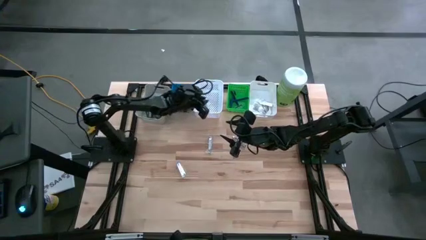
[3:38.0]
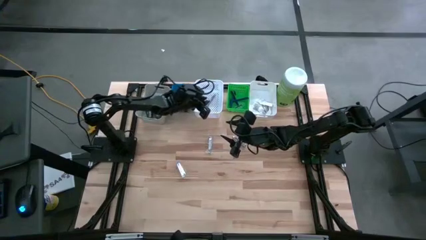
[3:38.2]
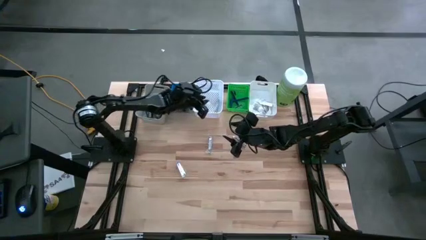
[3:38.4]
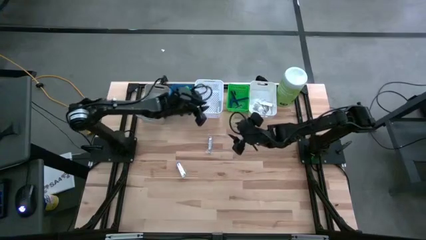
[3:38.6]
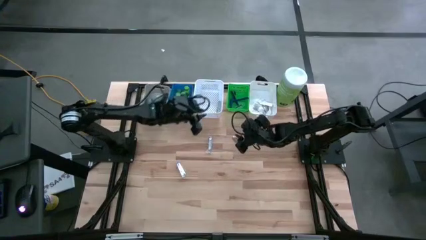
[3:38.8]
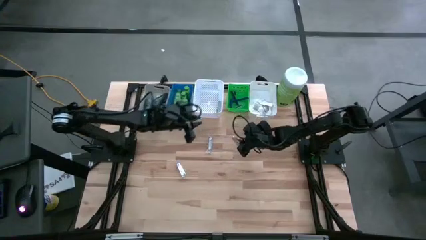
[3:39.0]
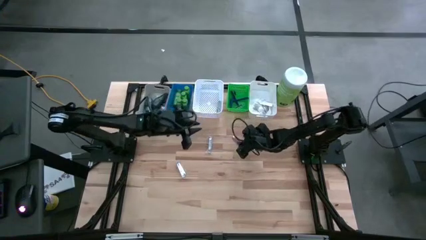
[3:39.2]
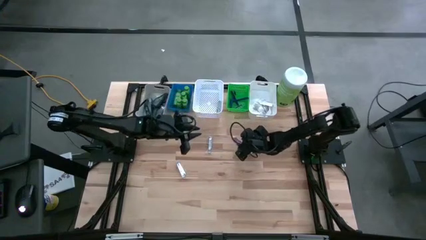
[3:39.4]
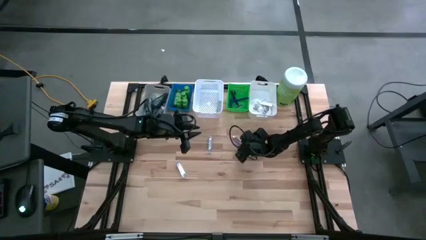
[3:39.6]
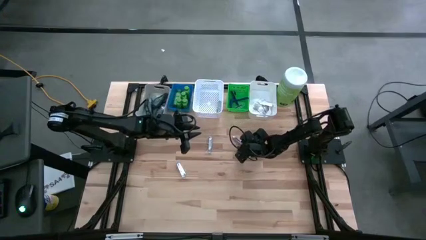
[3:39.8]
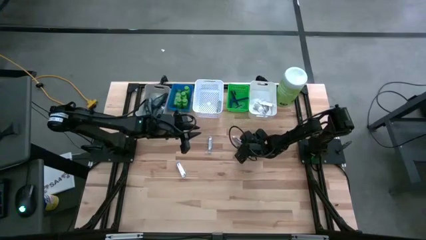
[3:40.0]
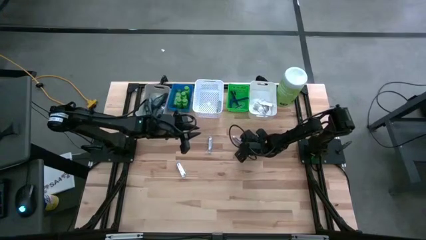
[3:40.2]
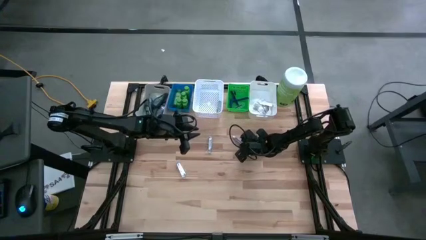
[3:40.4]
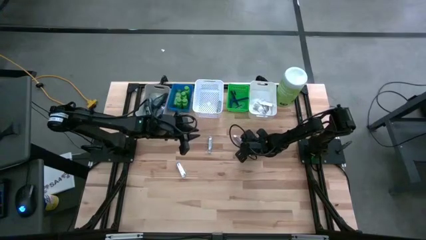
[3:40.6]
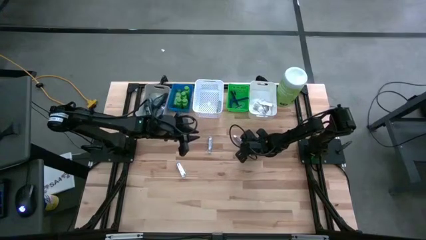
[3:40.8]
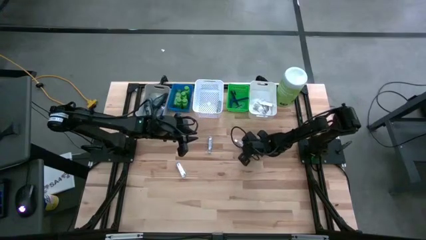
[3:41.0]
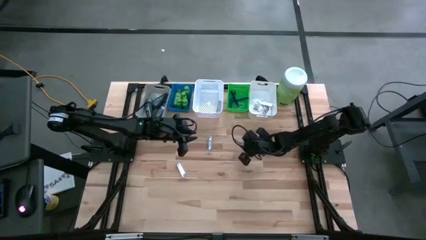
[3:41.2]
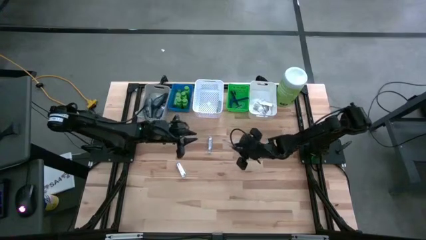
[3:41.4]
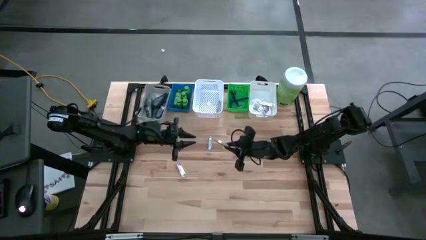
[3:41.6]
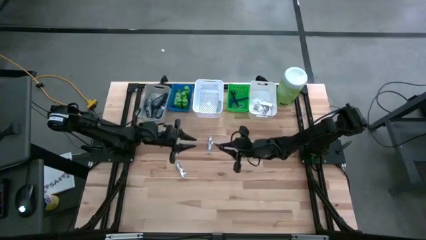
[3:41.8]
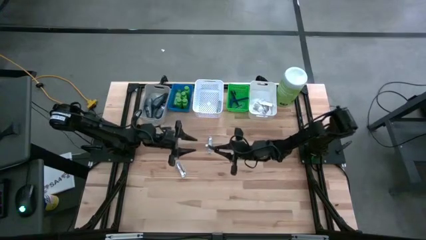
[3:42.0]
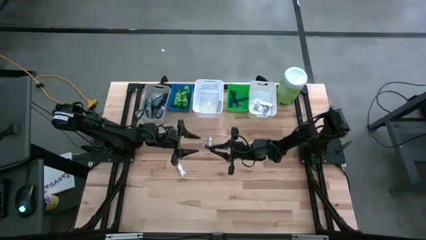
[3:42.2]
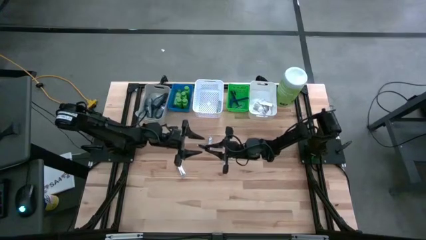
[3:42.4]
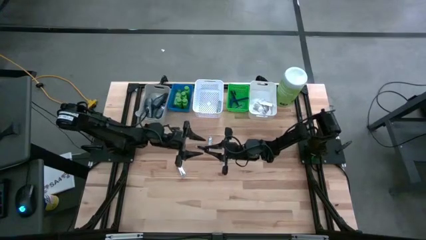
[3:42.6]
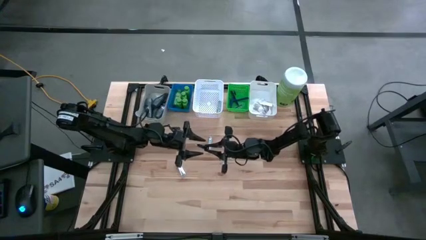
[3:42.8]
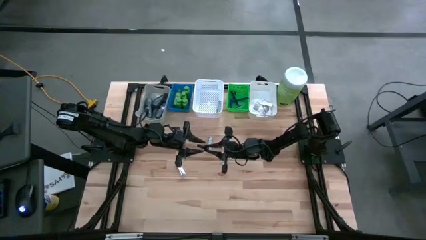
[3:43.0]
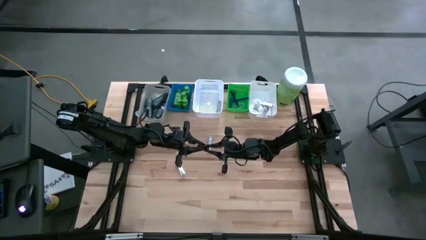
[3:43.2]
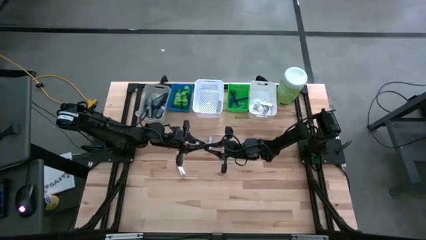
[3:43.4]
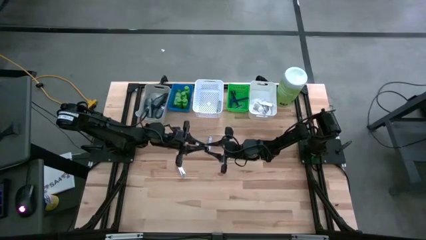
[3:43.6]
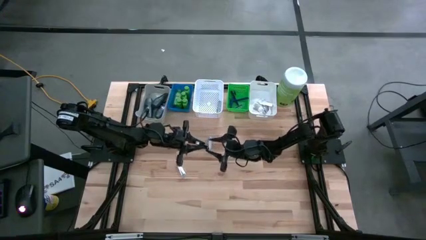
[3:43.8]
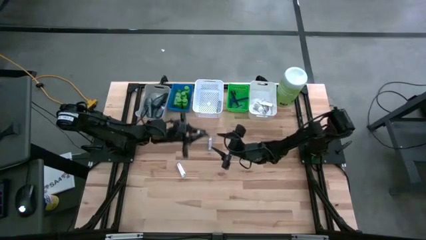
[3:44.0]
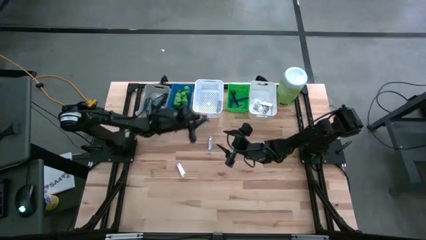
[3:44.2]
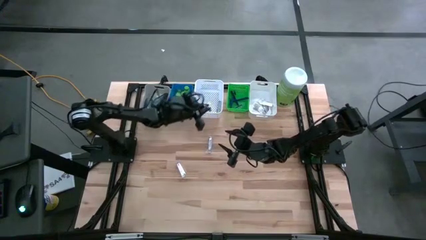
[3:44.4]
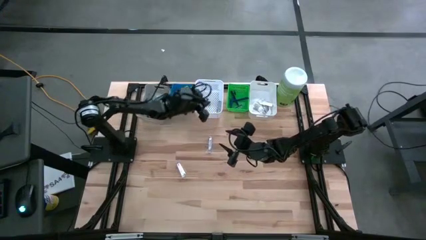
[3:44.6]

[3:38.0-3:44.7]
Task: Pick & Place Travel size toiletries
Put the nail cutter into the left white bin

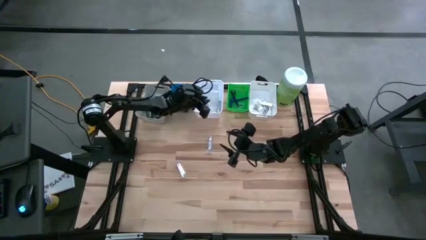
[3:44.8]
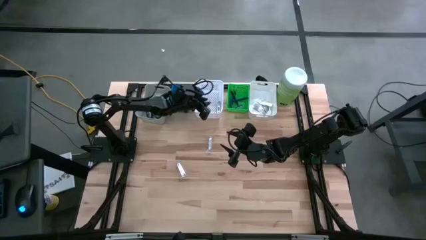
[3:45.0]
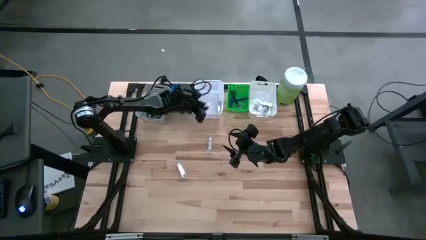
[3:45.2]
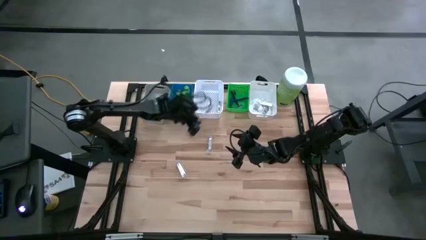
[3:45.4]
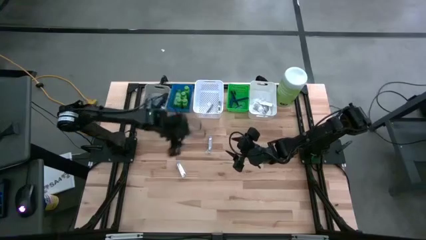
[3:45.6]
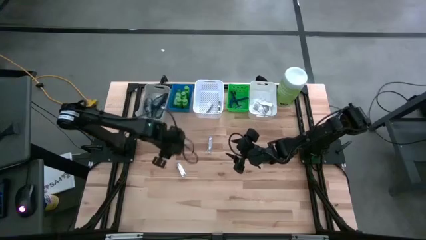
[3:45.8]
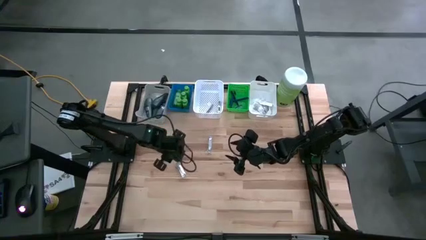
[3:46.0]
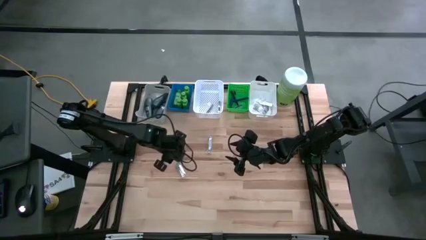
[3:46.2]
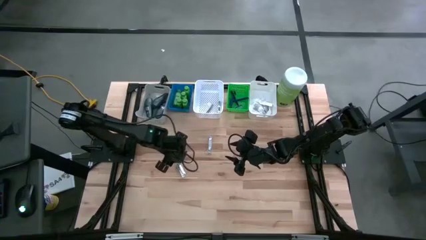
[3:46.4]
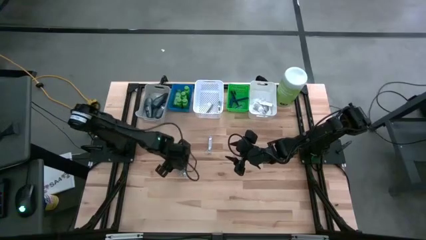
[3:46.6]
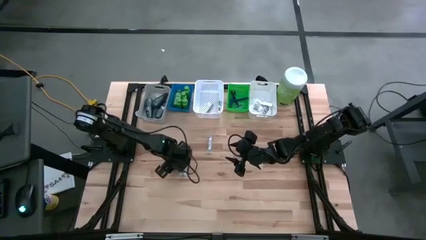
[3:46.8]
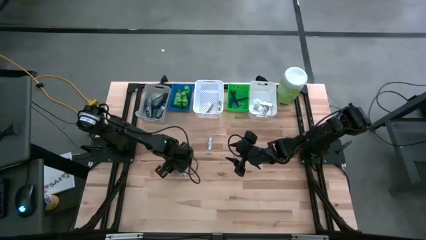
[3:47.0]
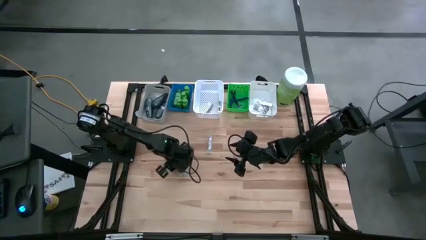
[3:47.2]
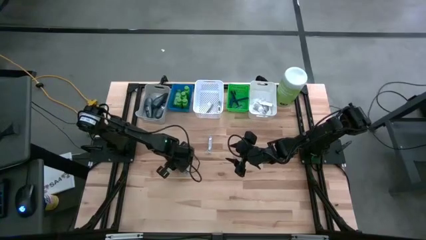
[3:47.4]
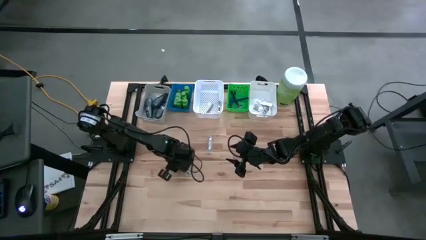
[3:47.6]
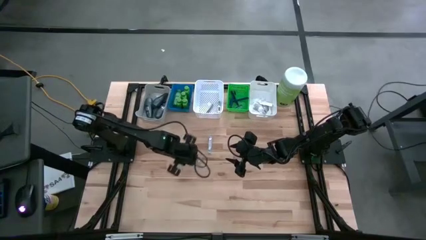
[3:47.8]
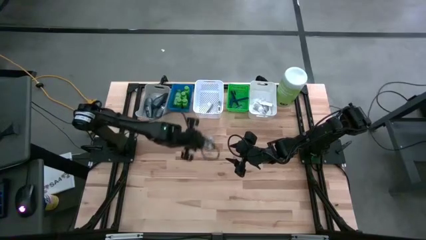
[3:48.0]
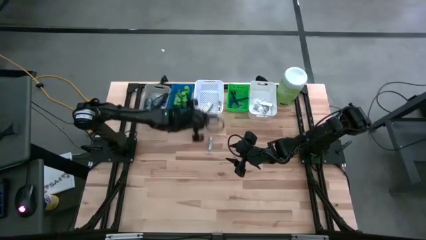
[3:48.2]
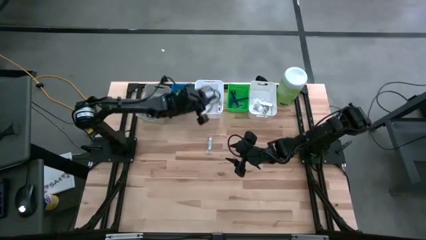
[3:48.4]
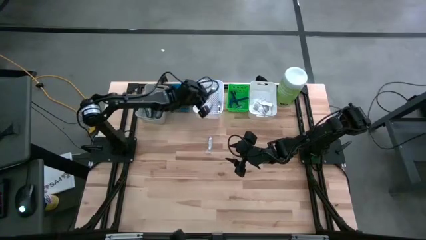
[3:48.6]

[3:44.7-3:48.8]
Put the nail cutter into the left white bin

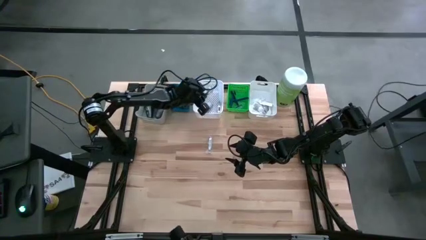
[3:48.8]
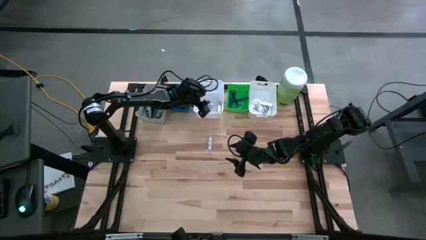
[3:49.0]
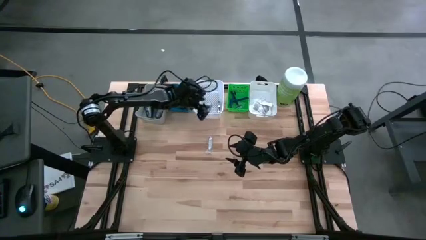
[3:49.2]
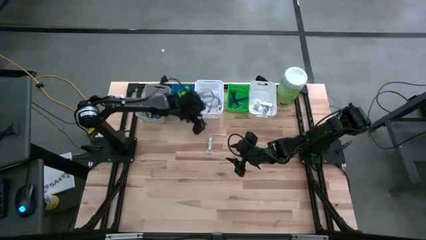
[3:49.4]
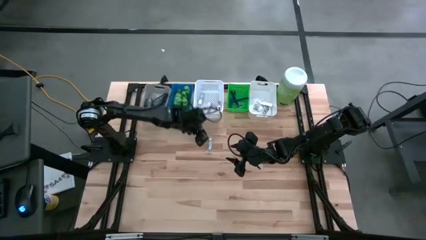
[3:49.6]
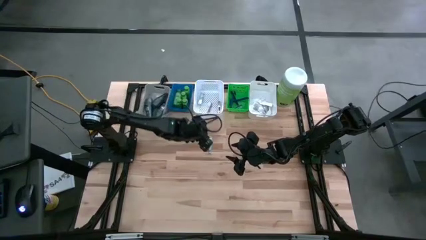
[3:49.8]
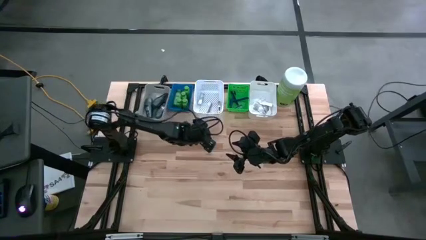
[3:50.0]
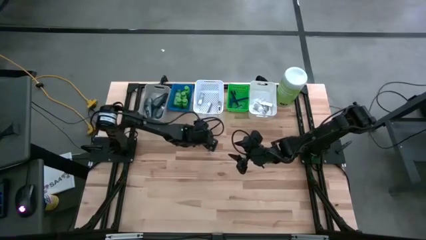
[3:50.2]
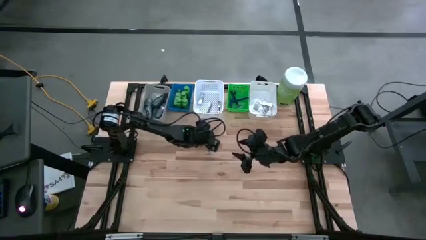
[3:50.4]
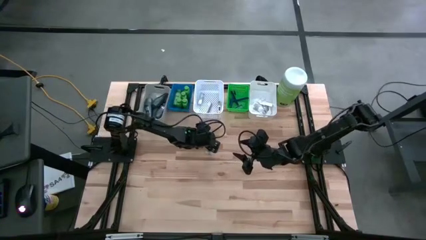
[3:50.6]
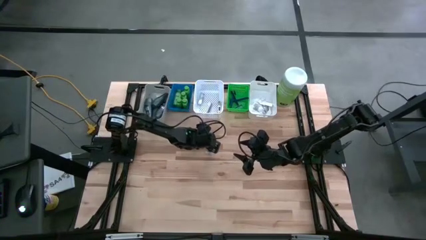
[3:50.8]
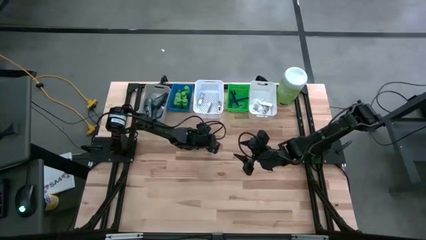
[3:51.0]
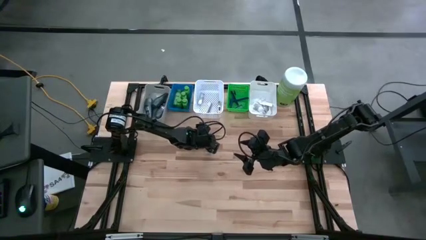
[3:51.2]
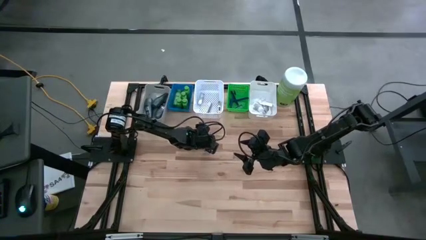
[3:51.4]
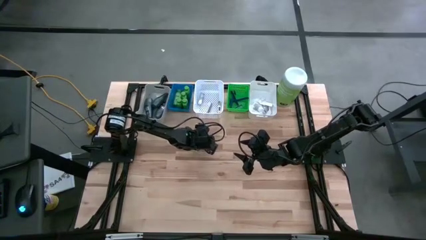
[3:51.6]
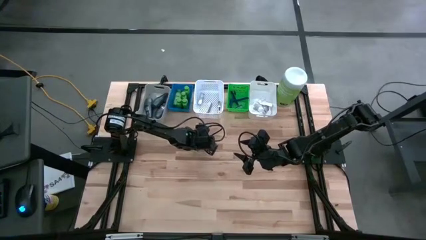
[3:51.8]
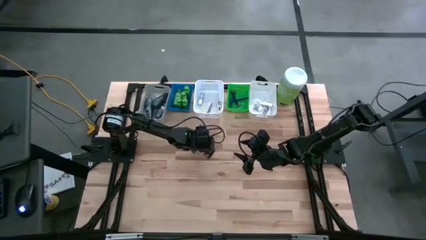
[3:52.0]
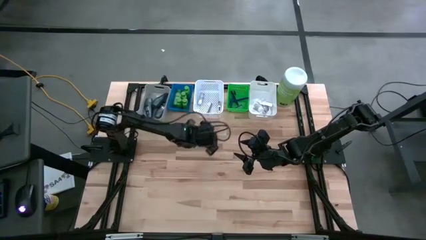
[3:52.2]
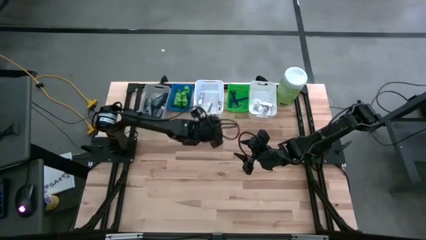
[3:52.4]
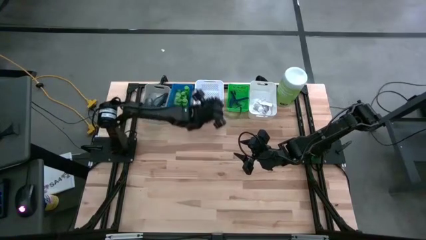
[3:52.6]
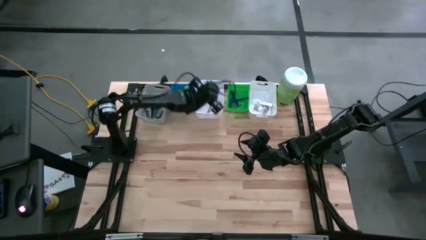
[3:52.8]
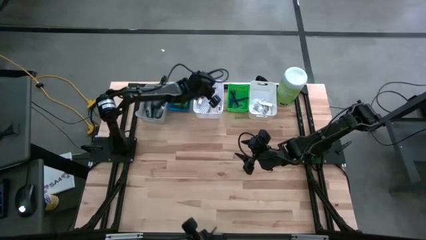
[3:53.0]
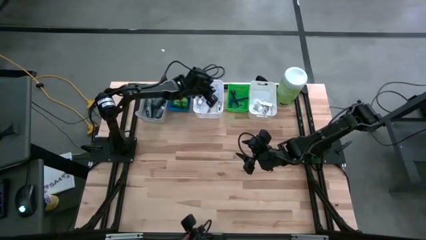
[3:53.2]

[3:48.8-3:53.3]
Put the nail cutter into the left white bin
